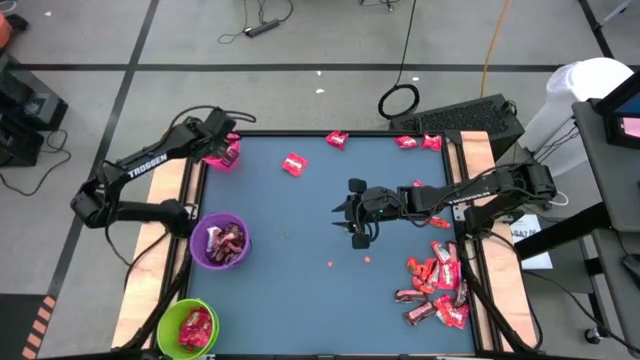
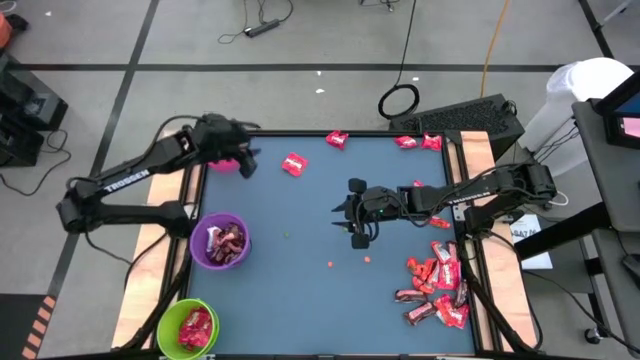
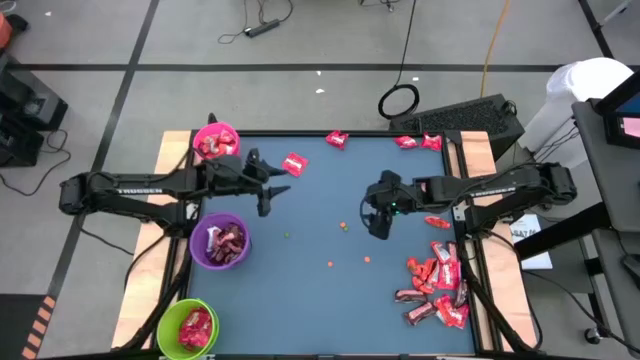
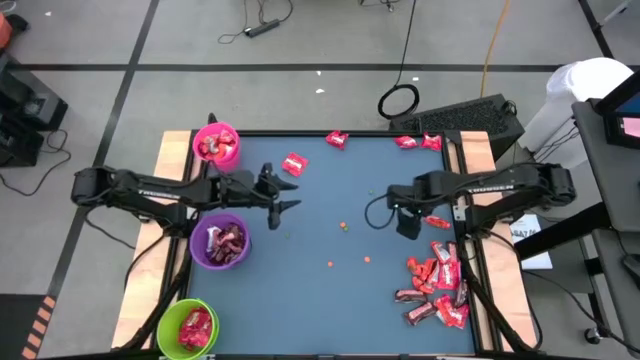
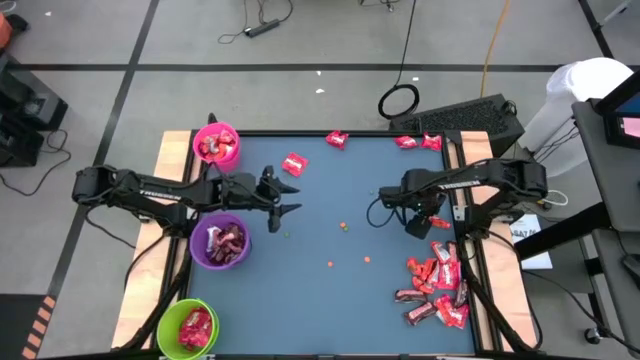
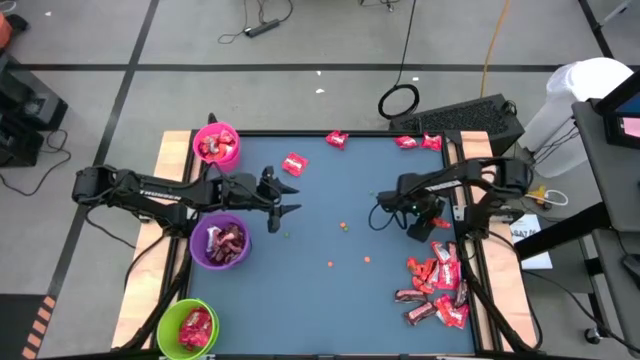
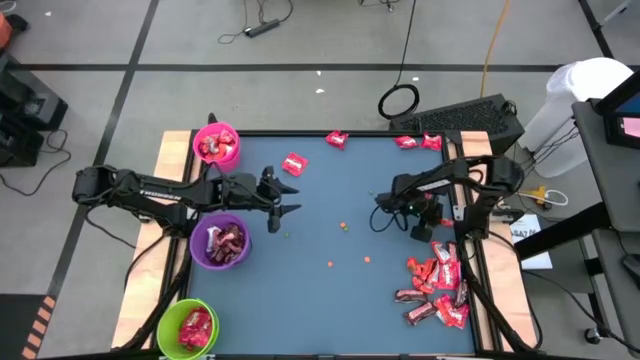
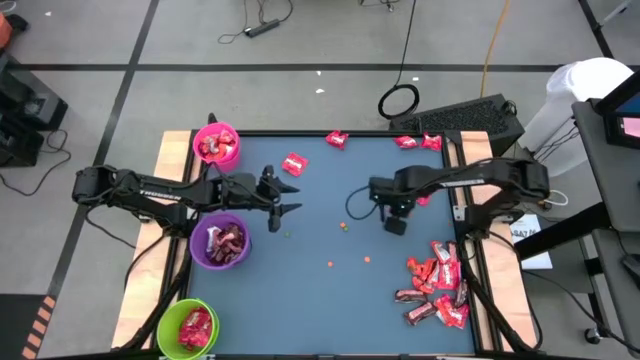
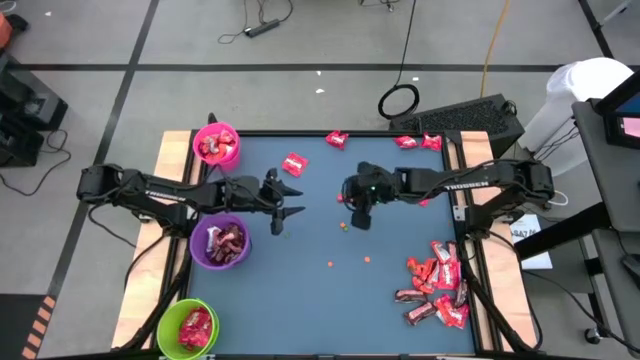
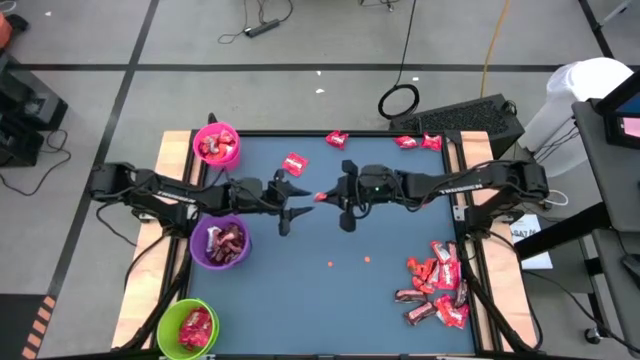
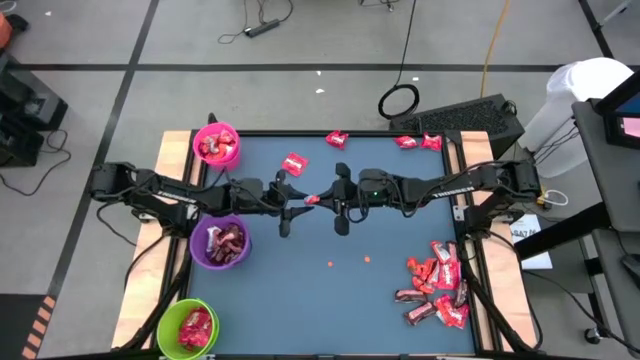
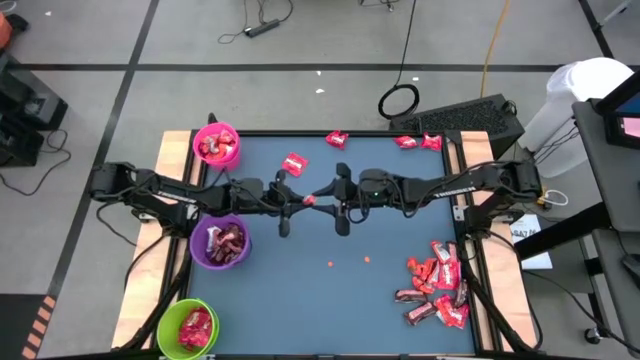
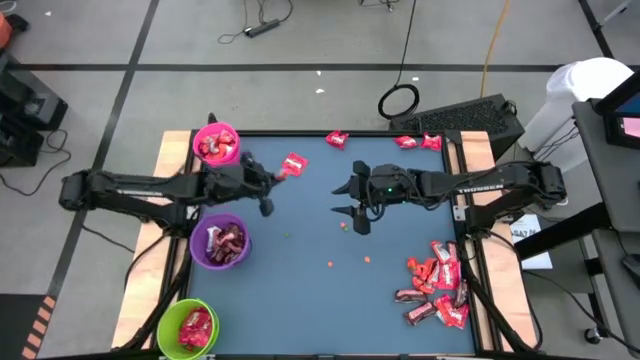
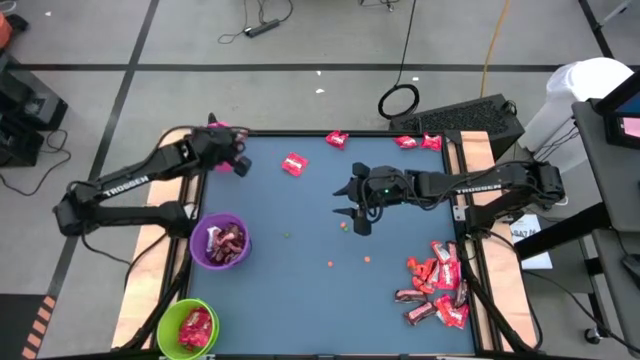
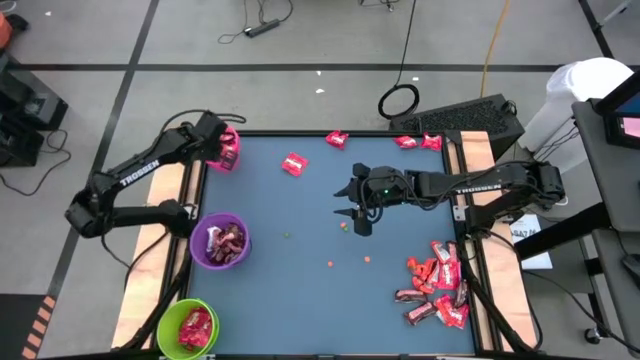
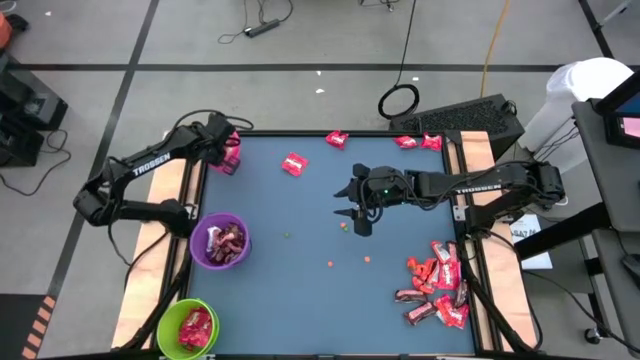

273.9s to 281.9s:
Task: Organize candy in baskets
Put the orange chocolate into the pink bucket

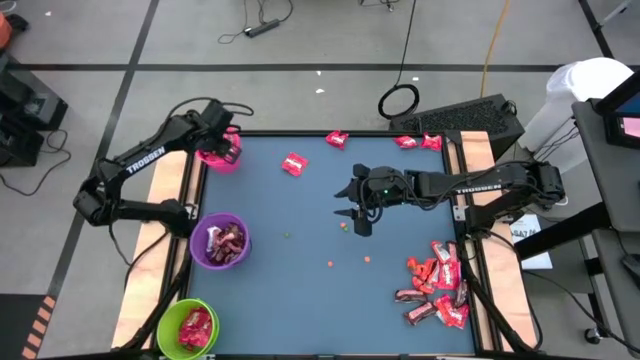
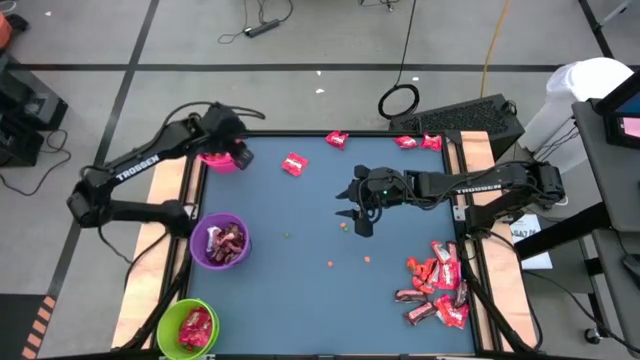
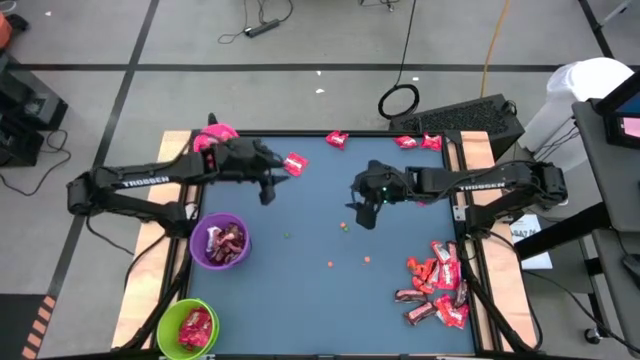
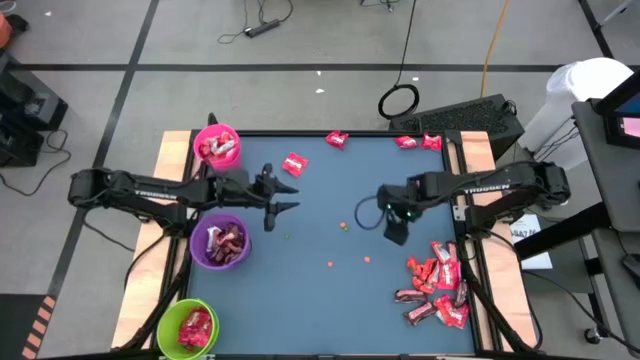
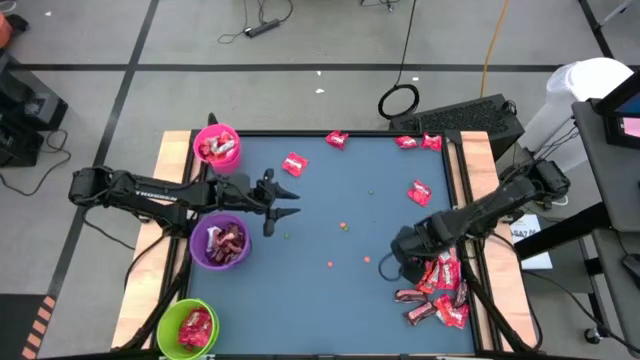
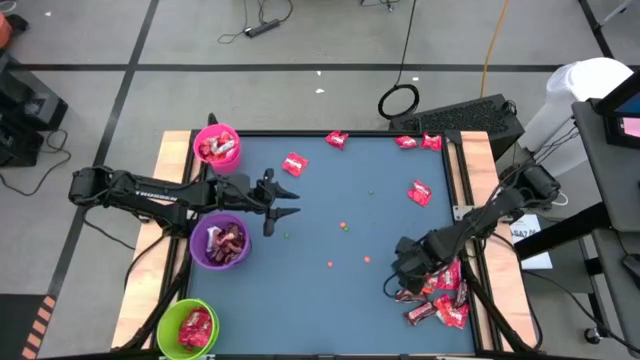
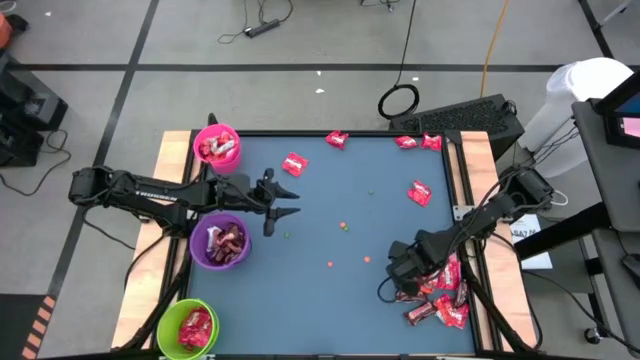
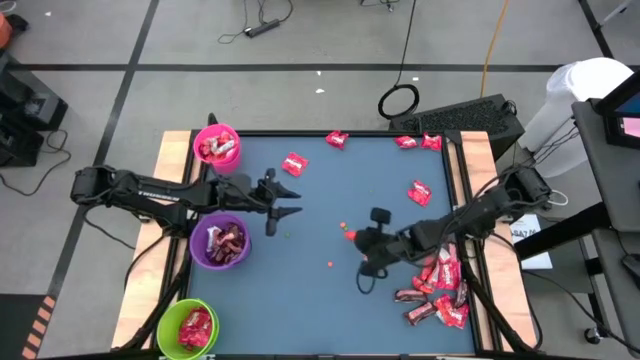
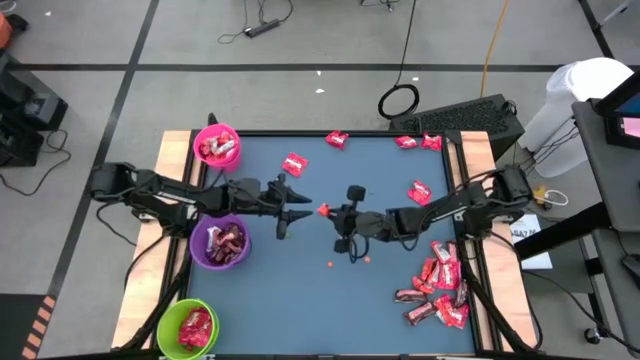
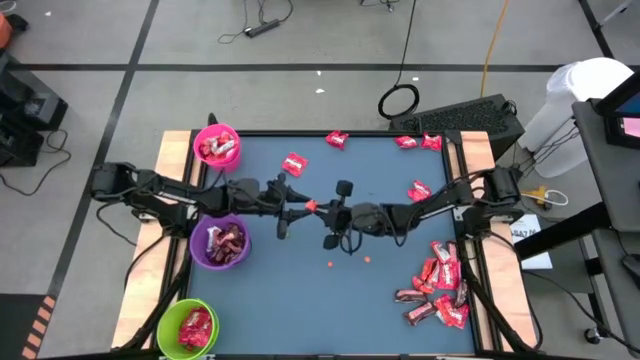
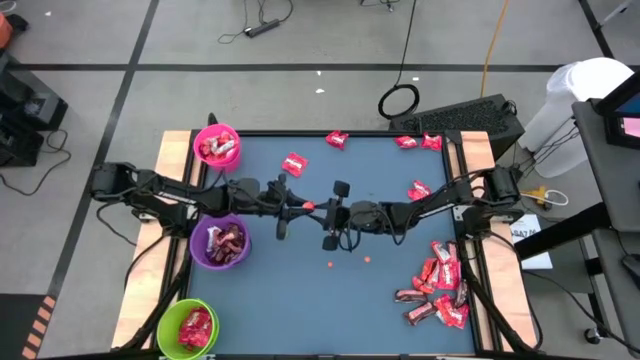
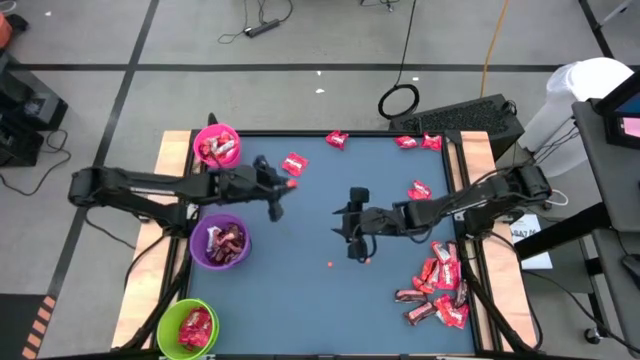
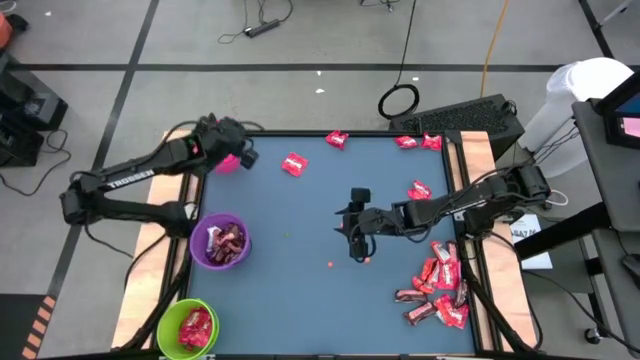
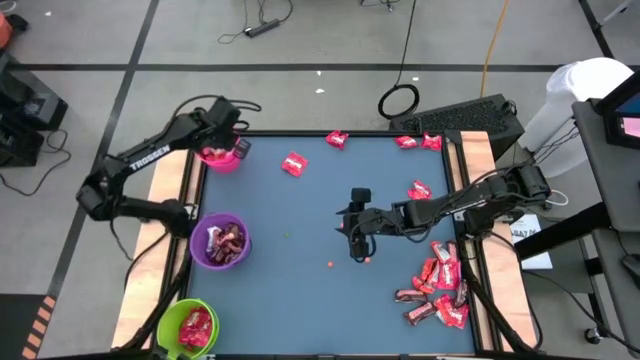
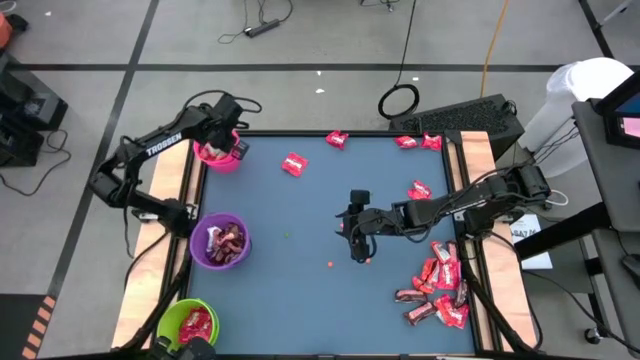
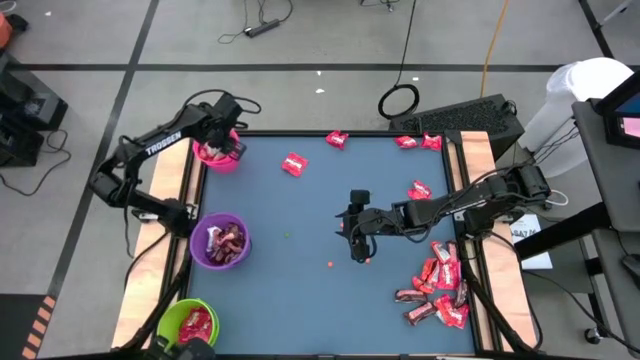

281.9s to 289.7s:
Put the orange chocolate into the pink bucket

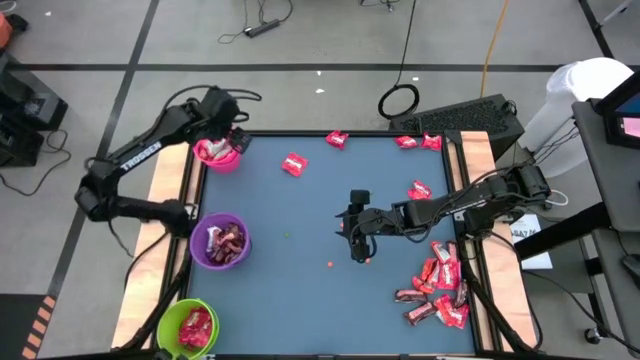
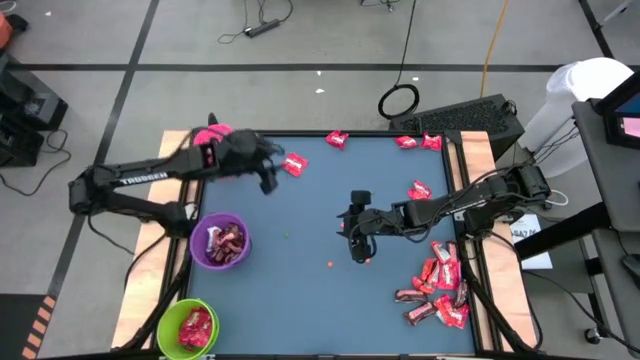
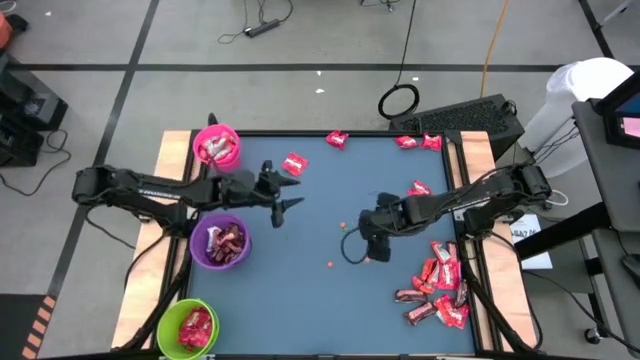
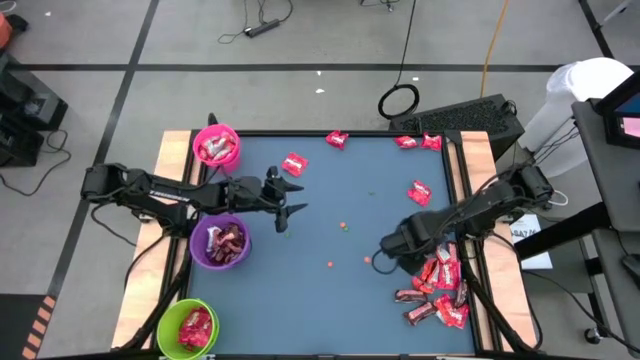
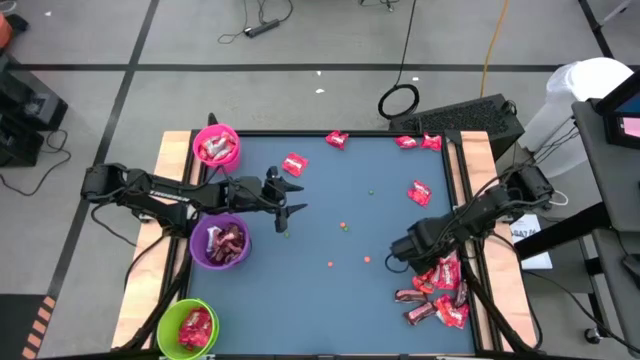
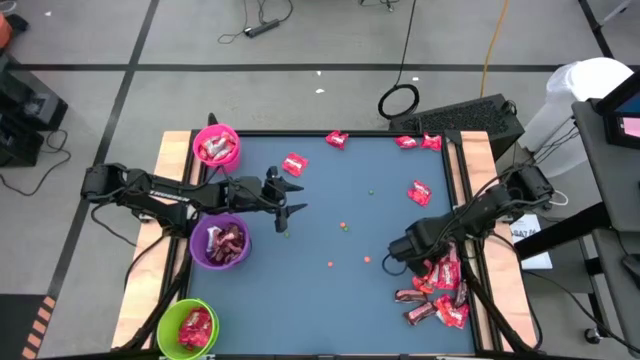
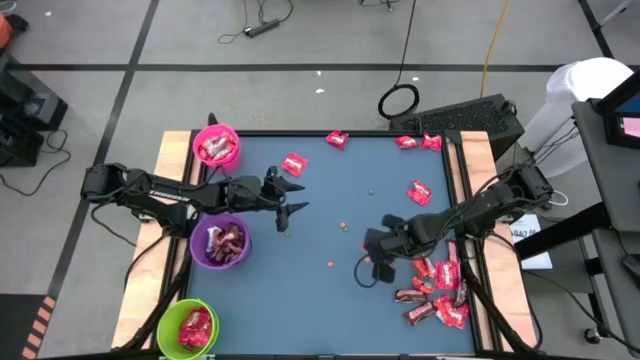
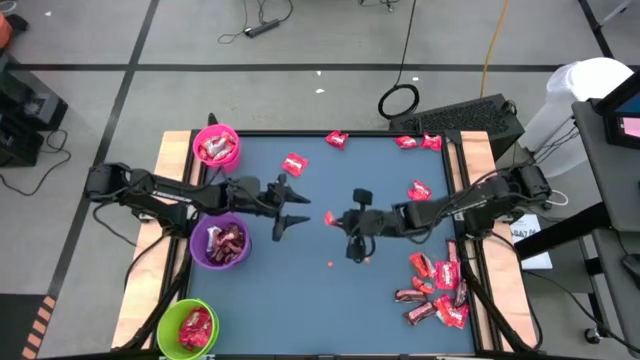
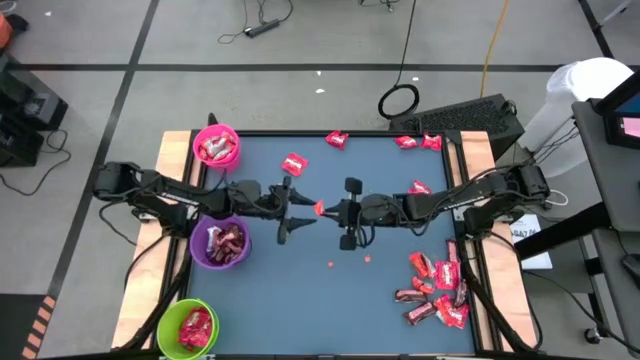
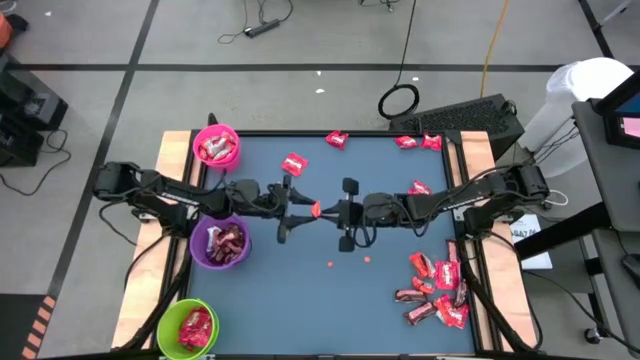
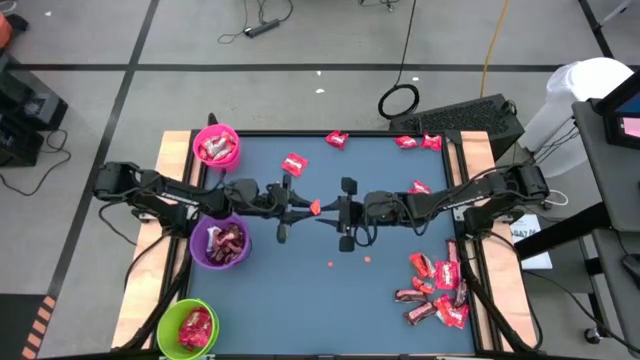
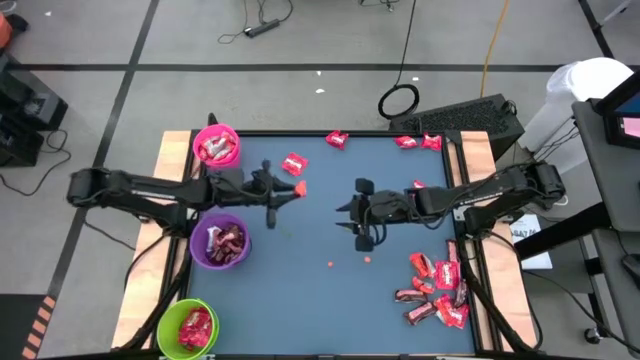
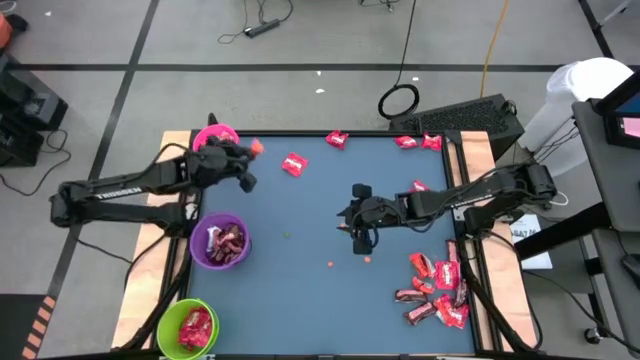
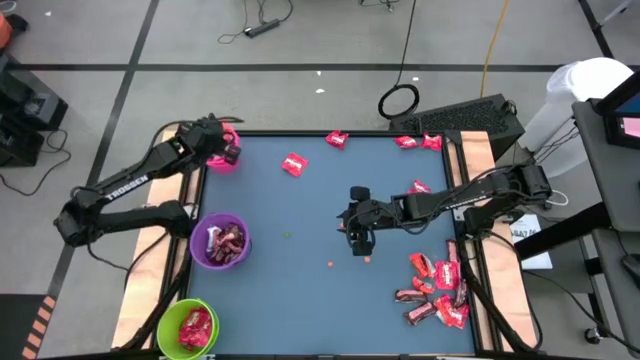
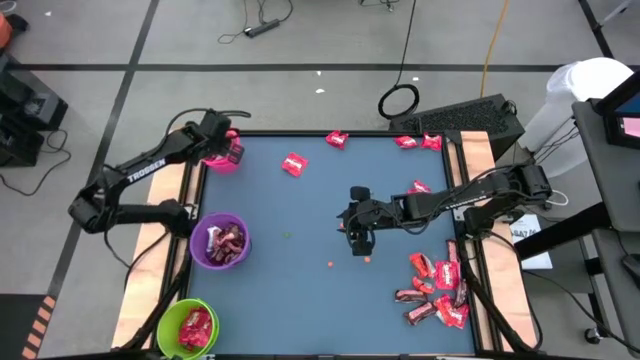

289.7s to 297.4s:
Put the orange chocolate into the pink bucket
